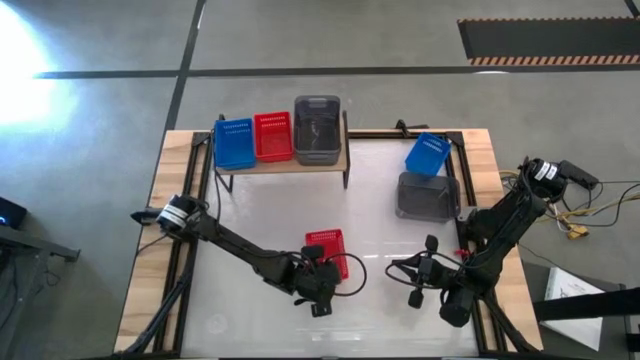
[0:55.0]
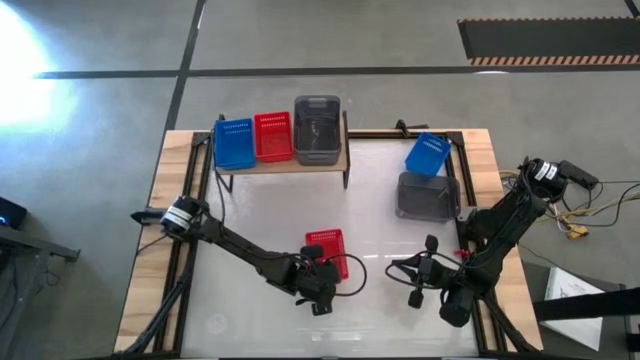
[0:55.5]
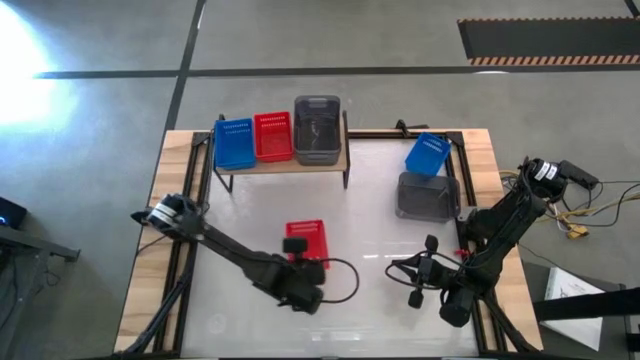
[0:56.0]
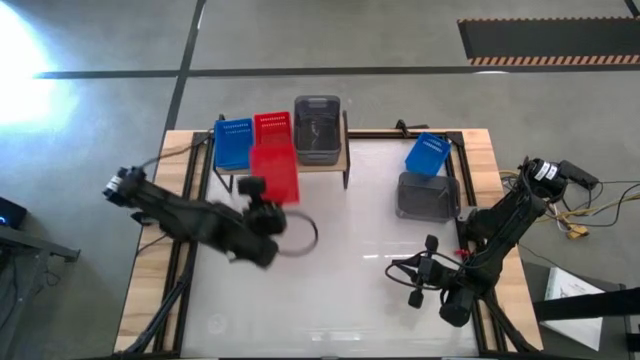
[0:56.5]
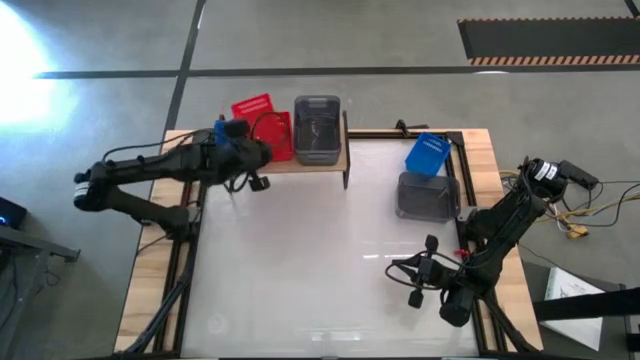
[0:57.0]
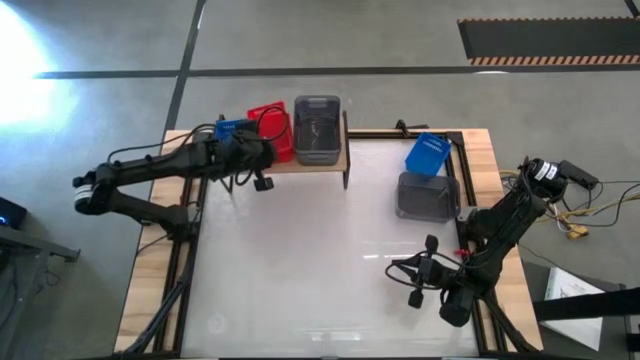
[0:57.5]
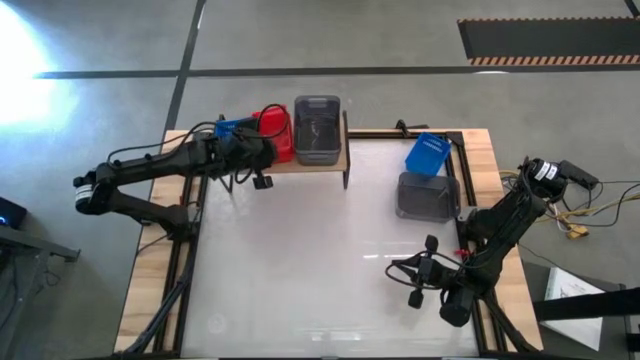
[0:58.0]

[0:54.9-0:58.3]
Task: Stack baskets on shelf by color
Stack the red bin on top of the stacked red bins on the shelf

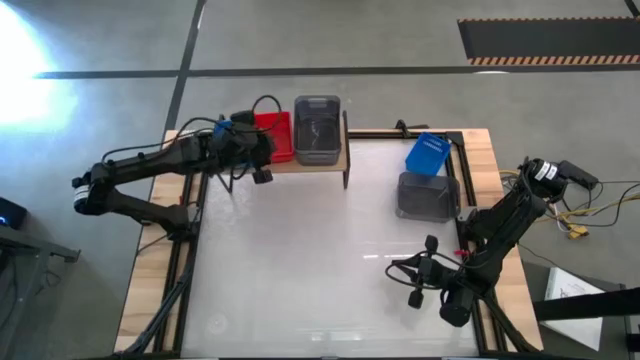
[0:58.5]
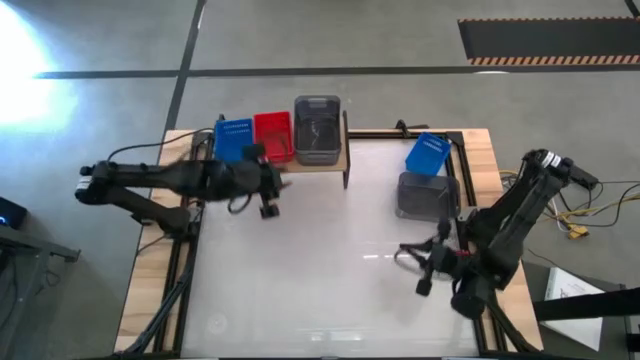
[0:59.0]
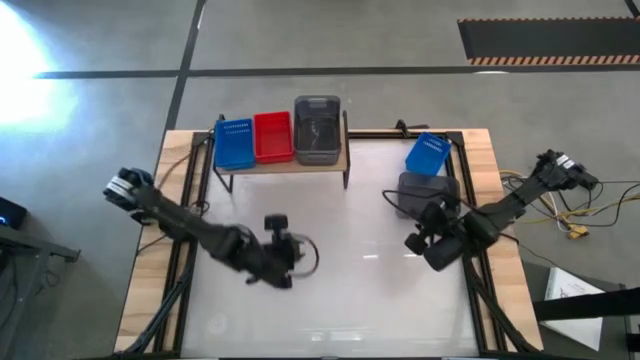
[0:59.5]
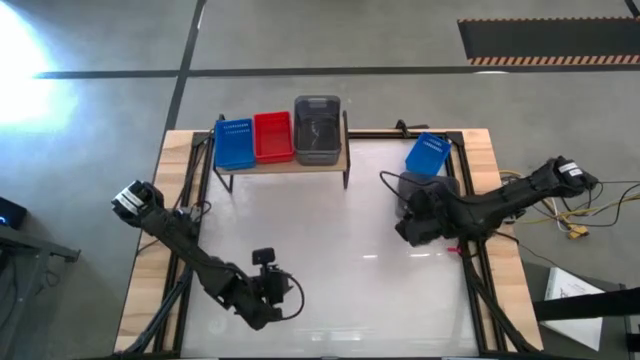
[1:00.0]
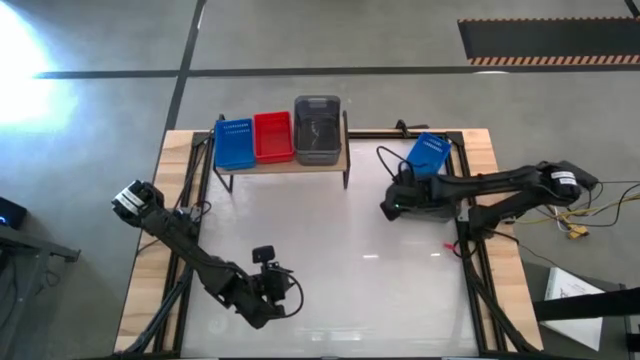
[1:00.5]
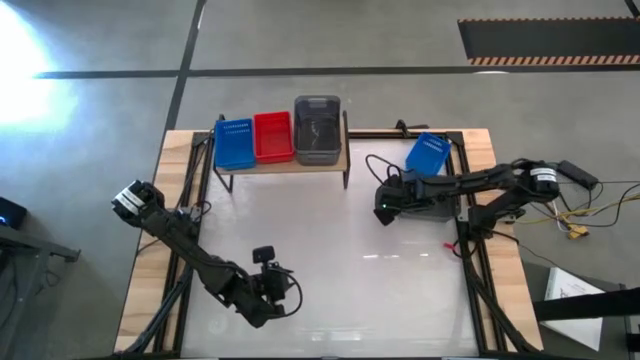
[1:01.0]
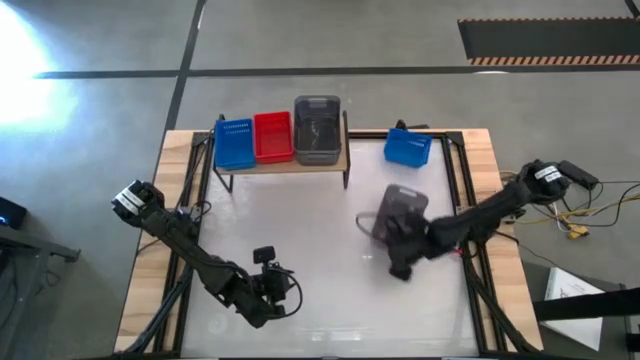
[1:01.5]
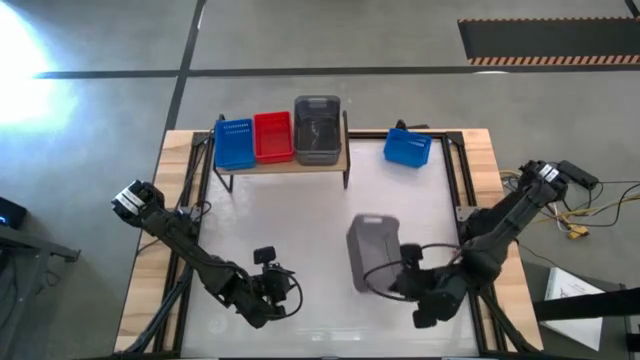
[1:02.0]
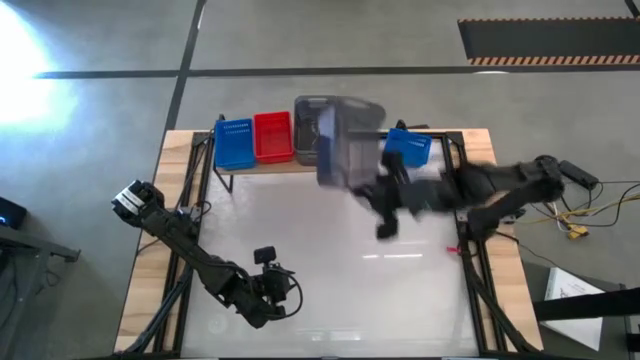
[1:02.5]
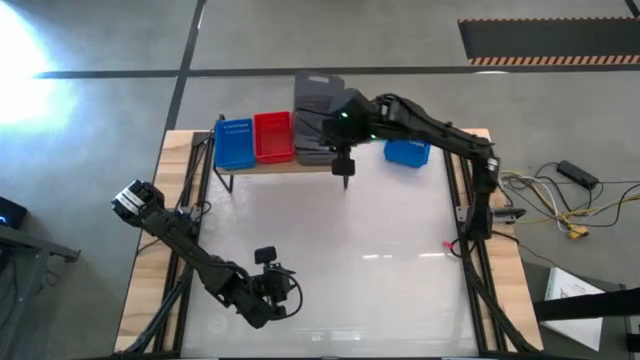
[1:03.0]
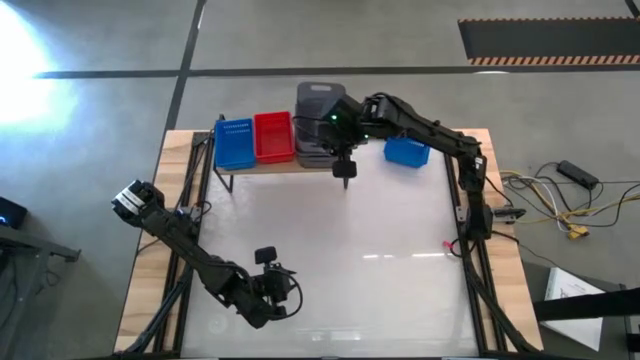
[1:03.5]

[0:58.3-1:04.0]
Stack the black bin on top of the stacked black bins on the shelf

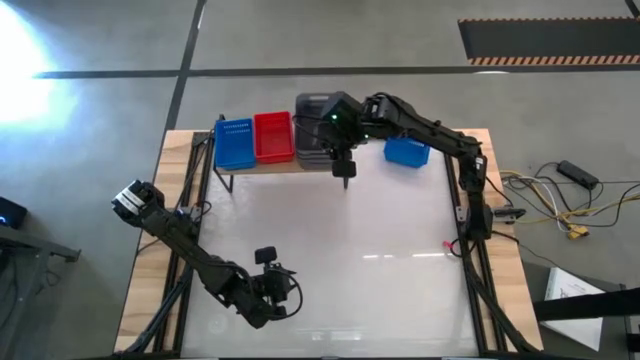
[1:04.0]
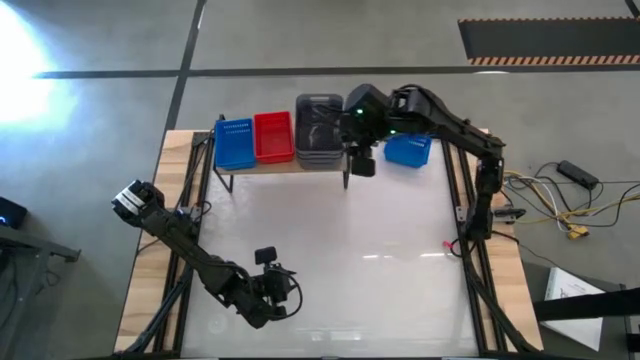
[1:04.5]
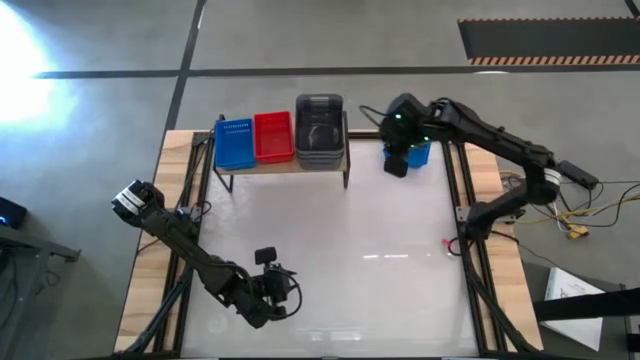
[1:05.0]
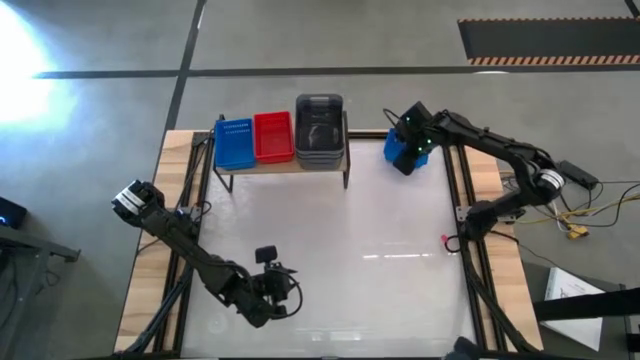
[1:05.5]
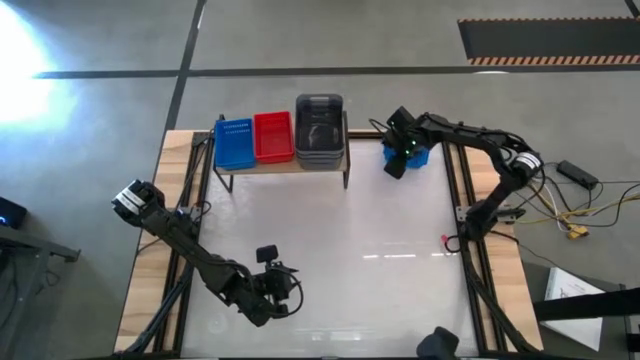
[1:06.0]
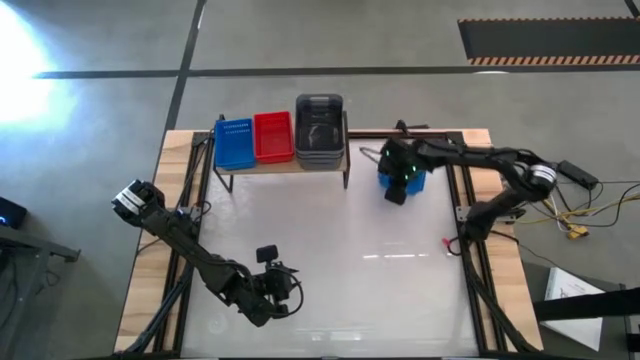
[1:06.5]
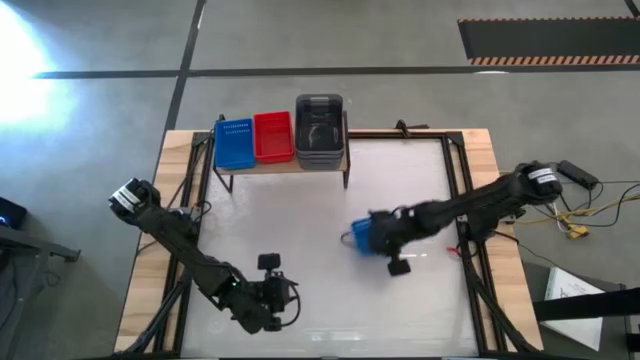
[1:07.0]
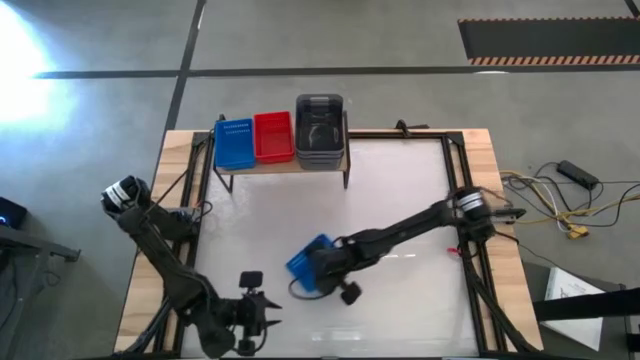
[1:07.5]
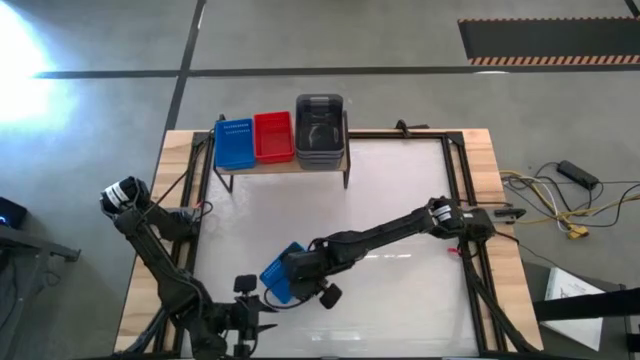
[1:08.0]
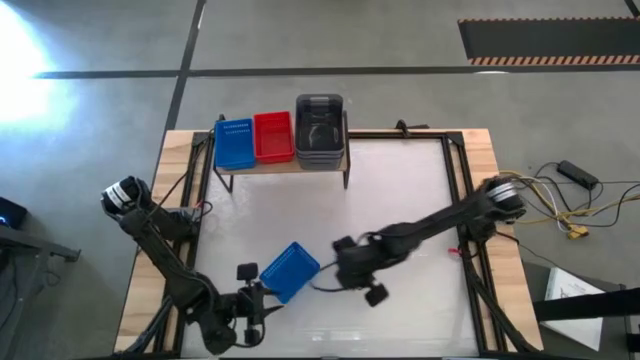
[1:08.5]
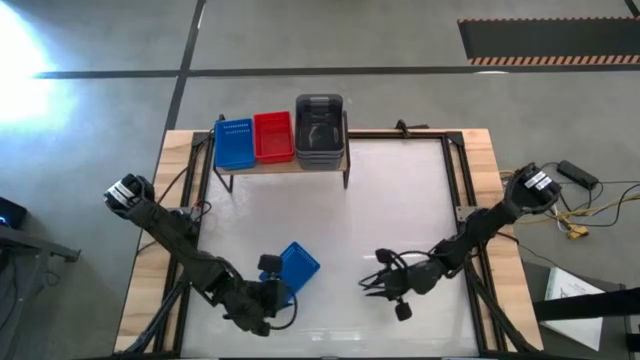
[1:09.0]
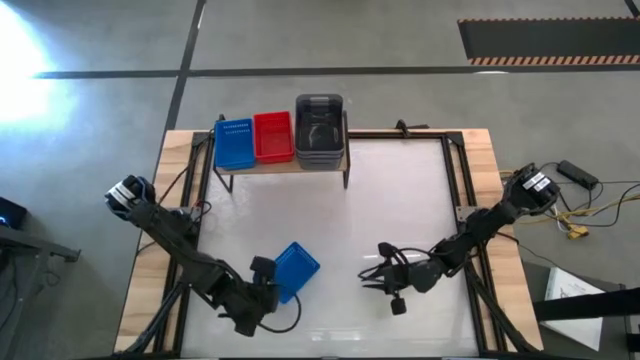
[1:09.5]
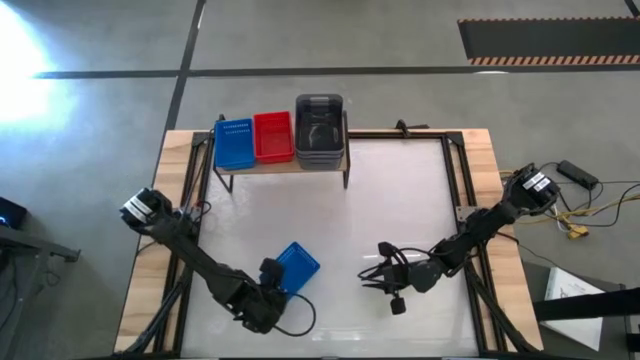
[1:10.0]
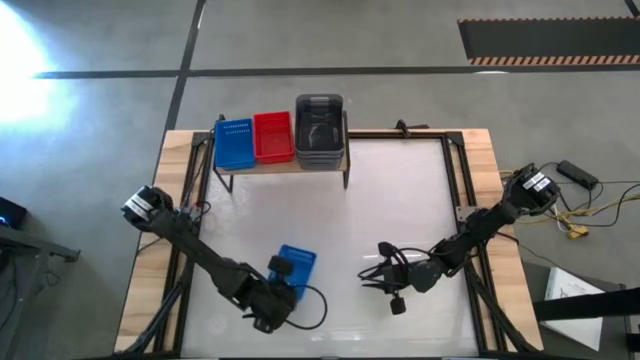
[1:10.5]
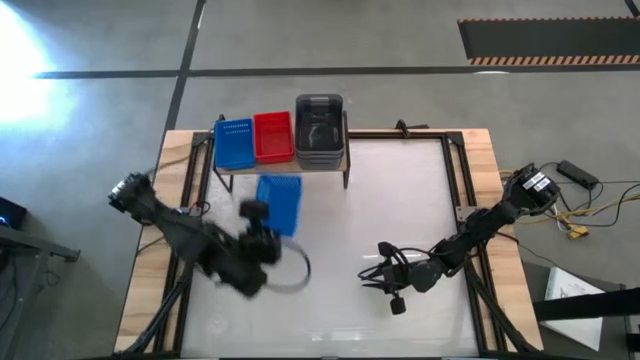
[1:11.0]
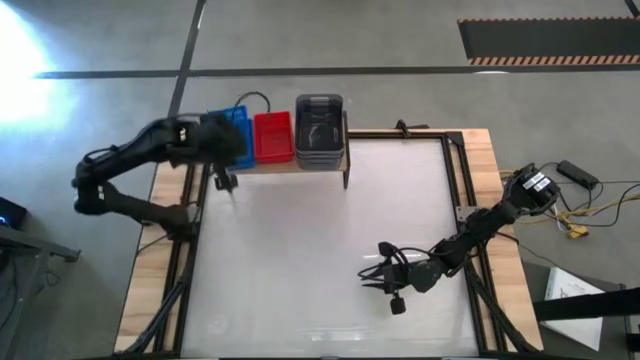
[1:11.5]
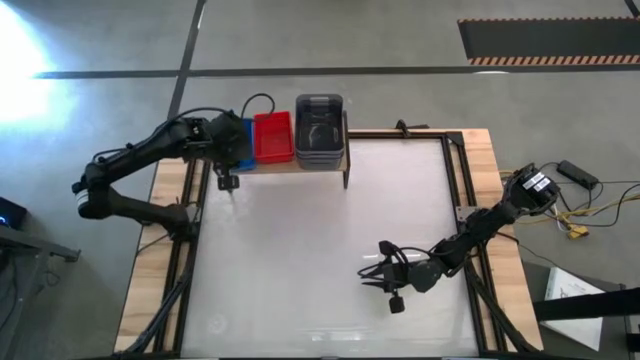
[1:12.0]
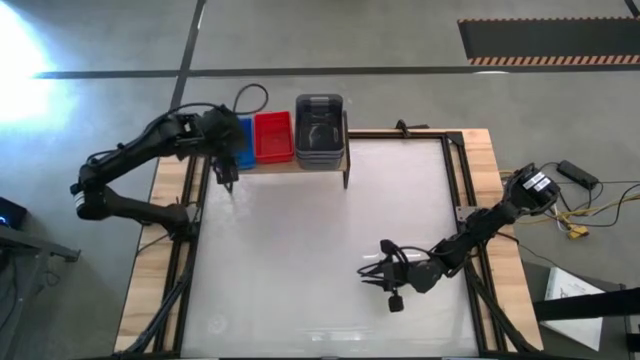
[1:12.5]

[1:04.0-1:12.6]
Stack the blue bin on top of the stacked blue bins on the shelf

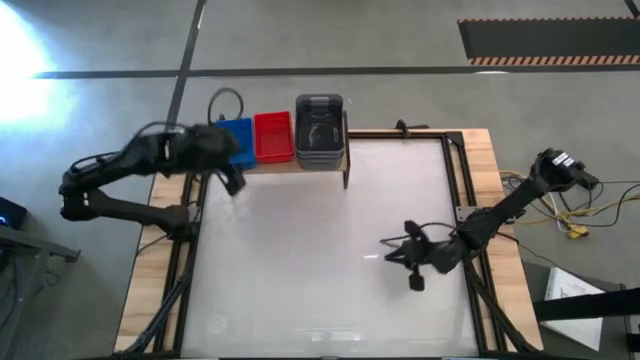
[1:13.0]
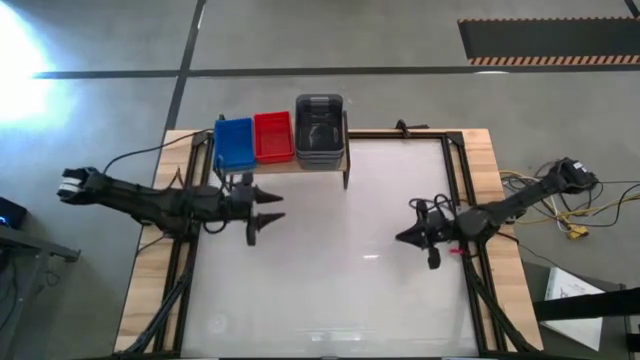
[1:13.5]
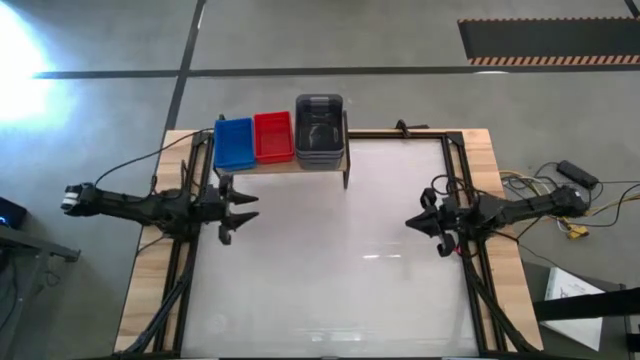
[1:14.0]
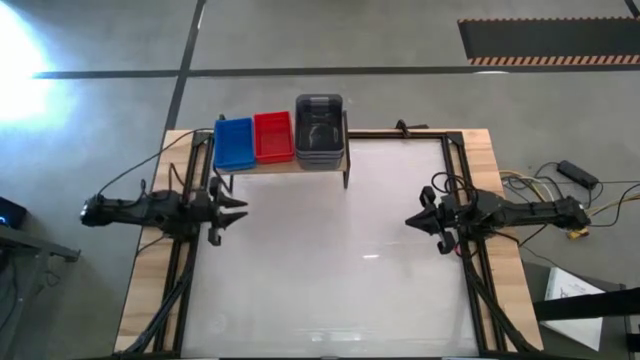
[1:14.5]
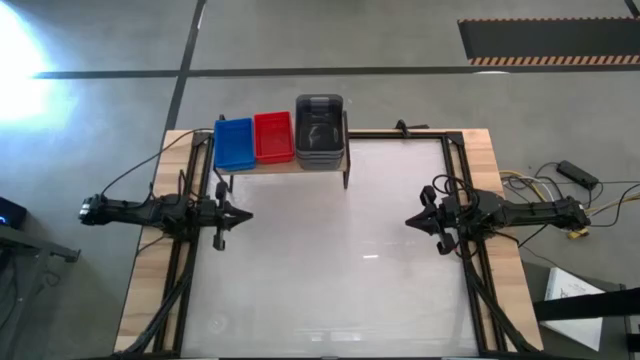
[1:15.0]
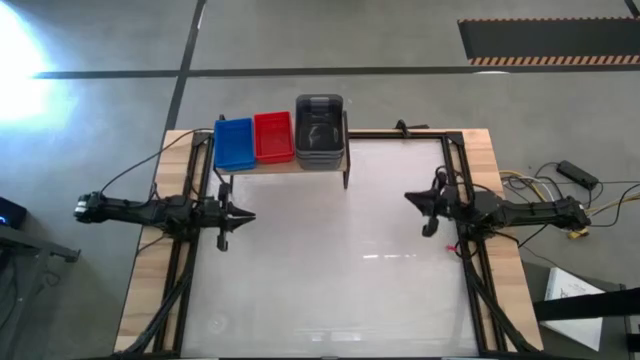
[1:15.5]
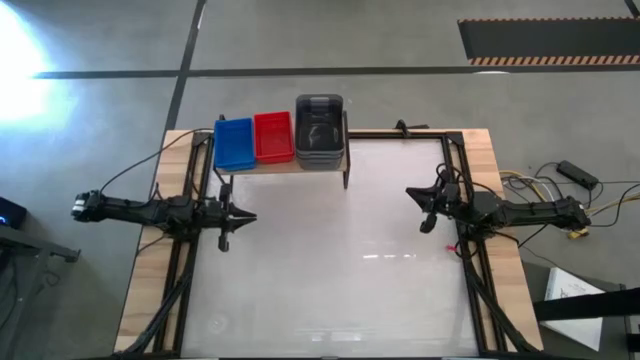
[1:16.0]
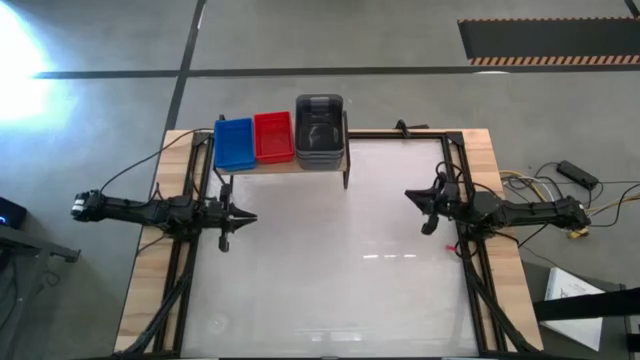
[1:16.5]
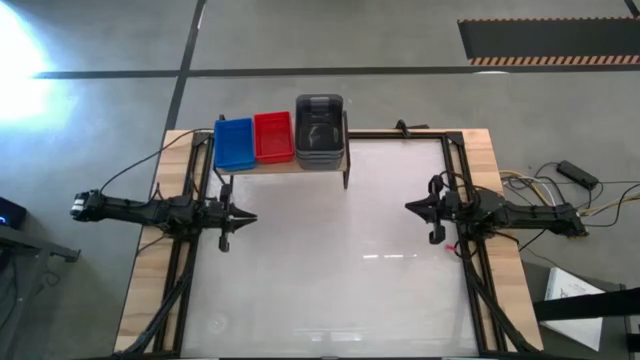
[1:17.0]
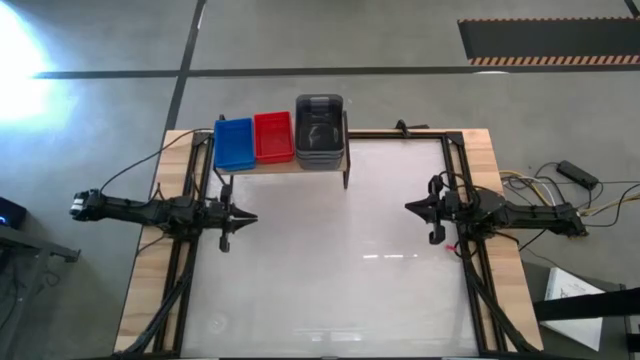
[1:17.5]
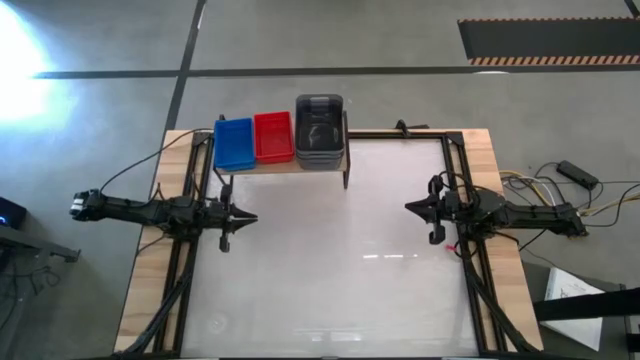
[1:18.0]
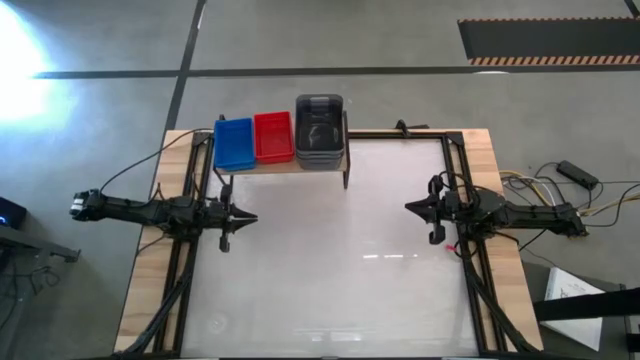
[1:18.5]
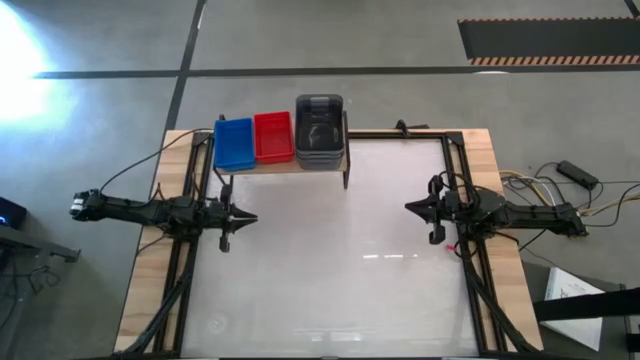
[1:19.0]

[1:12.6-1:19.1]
Return to Home Position
